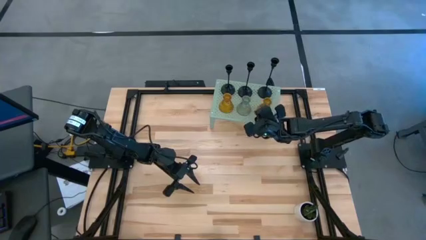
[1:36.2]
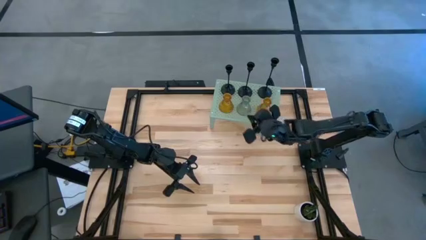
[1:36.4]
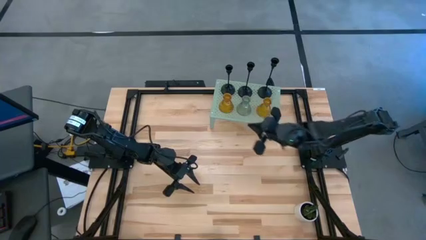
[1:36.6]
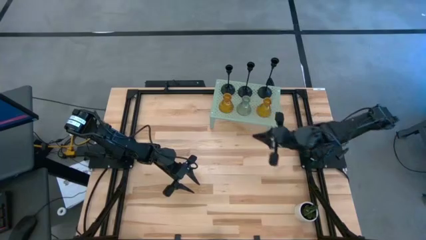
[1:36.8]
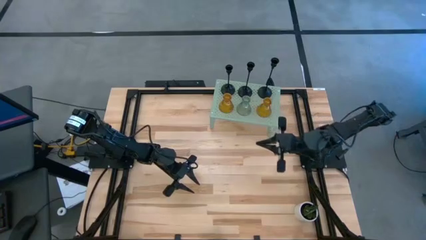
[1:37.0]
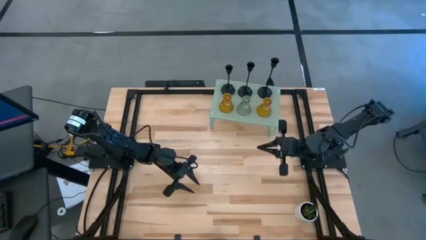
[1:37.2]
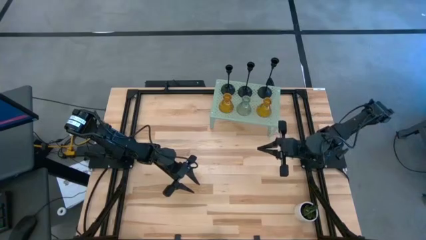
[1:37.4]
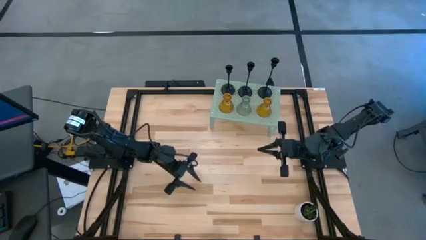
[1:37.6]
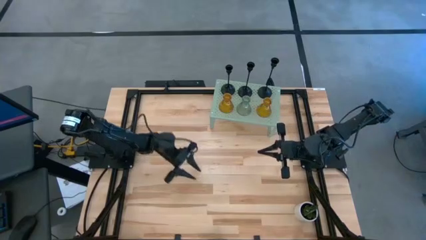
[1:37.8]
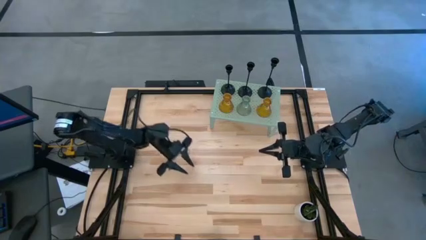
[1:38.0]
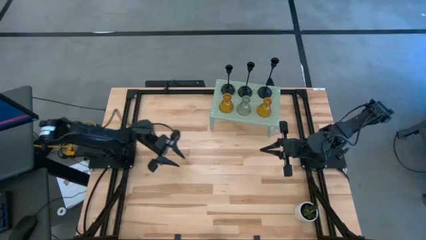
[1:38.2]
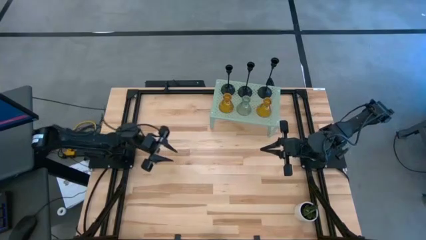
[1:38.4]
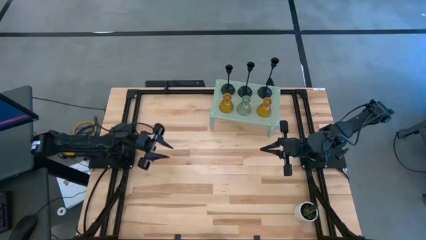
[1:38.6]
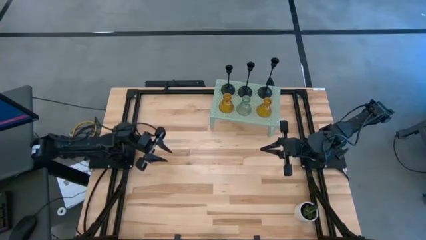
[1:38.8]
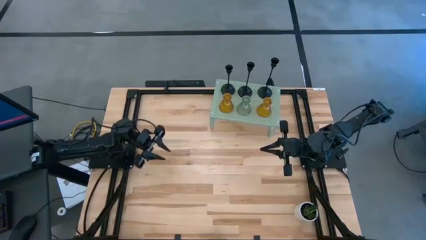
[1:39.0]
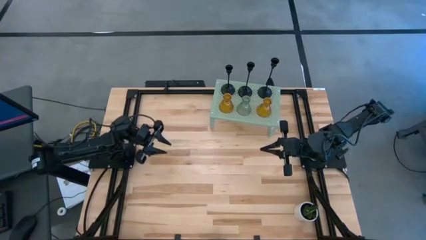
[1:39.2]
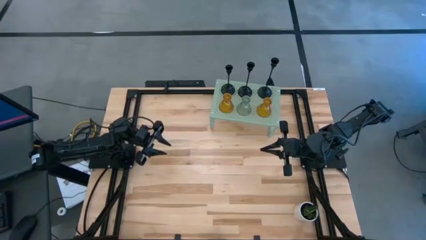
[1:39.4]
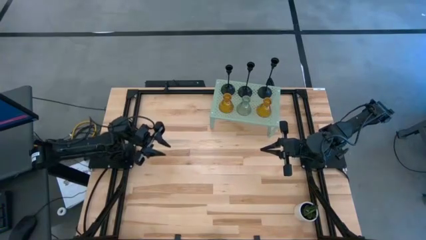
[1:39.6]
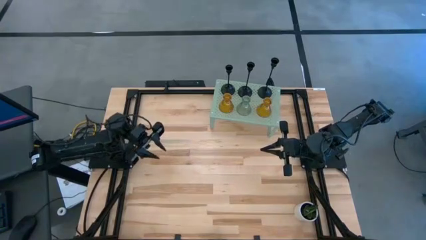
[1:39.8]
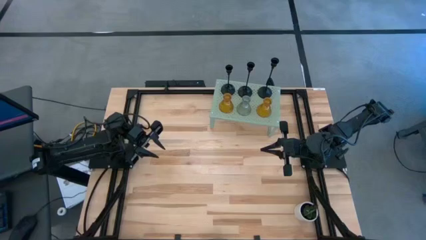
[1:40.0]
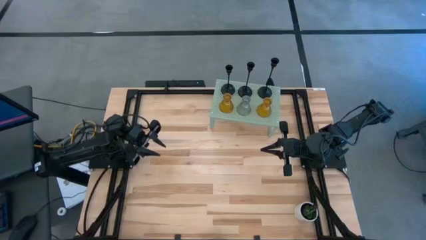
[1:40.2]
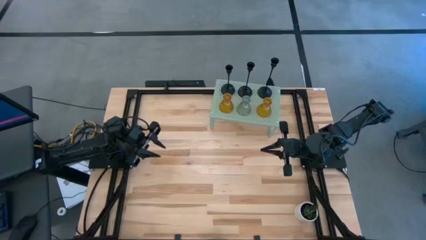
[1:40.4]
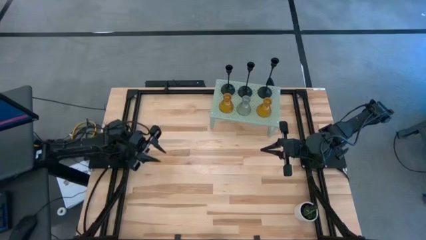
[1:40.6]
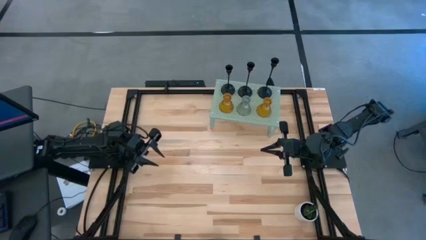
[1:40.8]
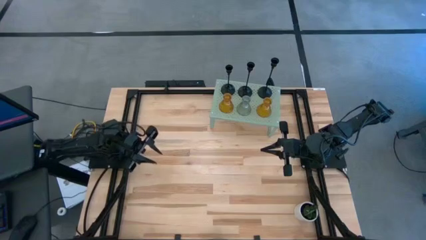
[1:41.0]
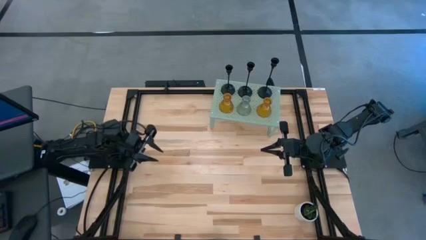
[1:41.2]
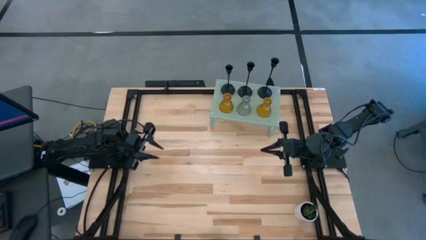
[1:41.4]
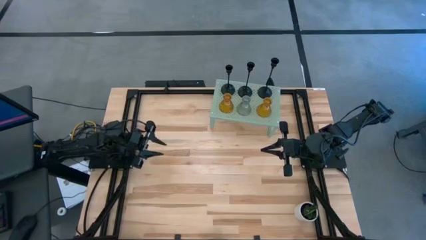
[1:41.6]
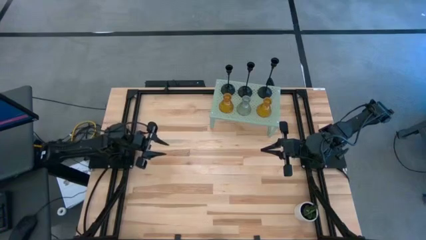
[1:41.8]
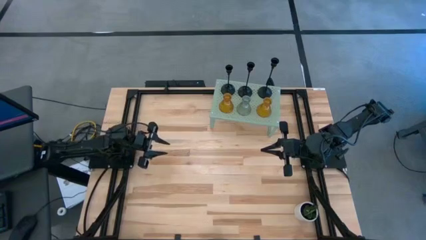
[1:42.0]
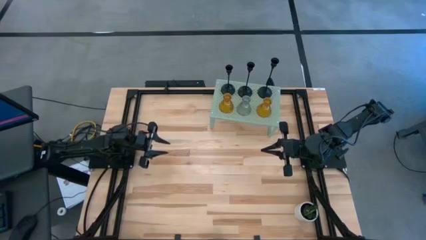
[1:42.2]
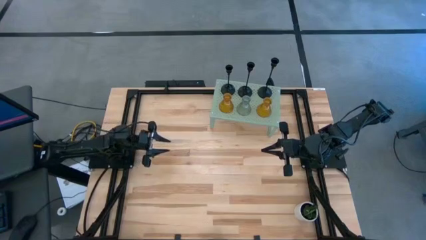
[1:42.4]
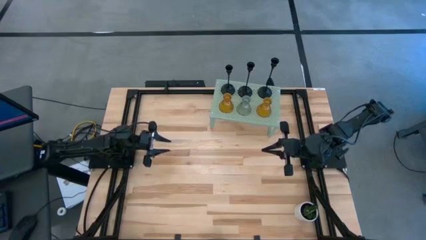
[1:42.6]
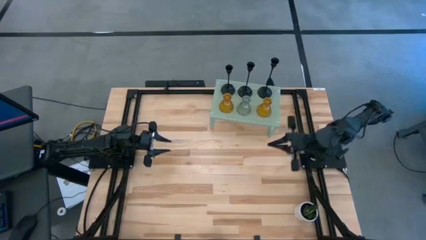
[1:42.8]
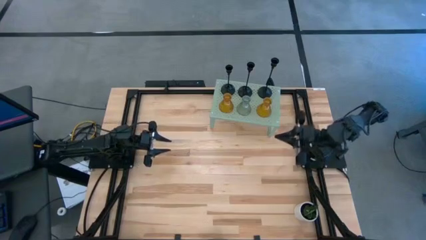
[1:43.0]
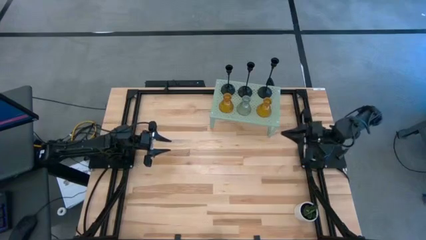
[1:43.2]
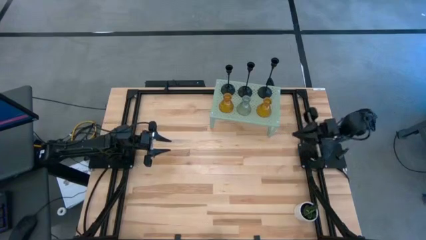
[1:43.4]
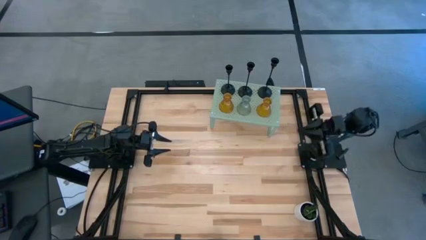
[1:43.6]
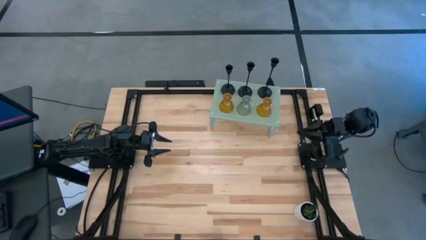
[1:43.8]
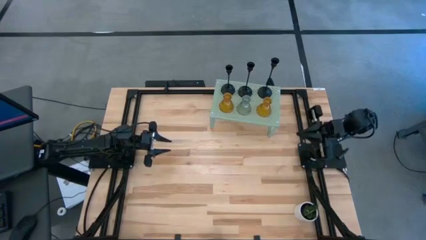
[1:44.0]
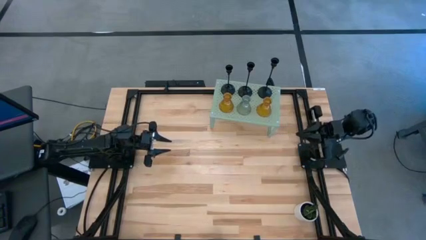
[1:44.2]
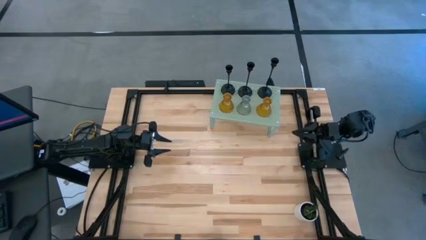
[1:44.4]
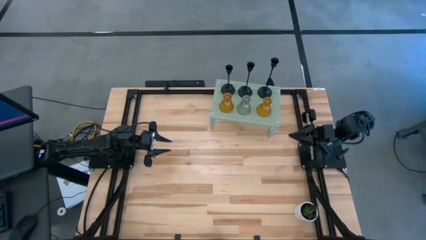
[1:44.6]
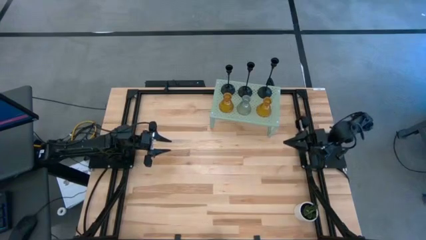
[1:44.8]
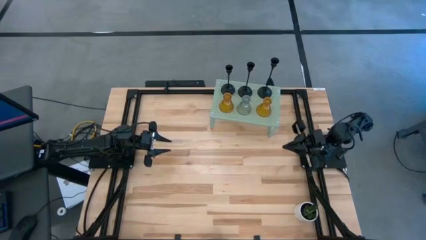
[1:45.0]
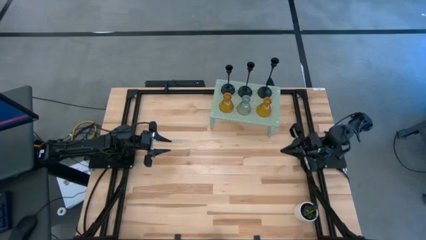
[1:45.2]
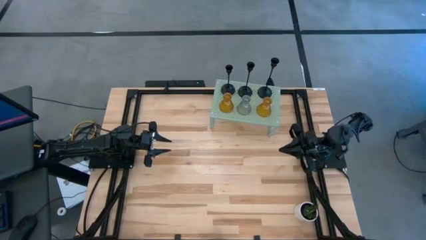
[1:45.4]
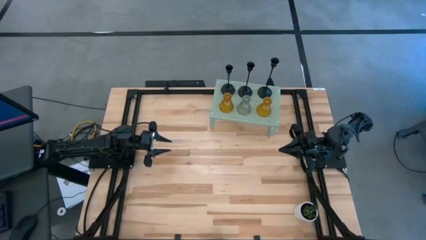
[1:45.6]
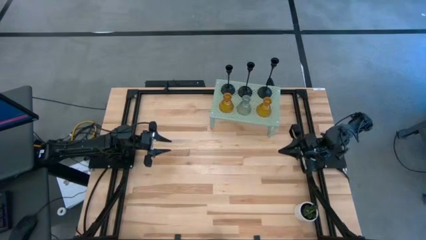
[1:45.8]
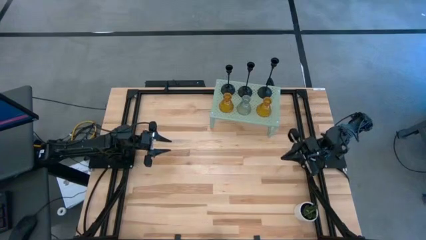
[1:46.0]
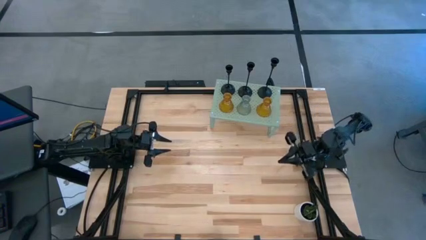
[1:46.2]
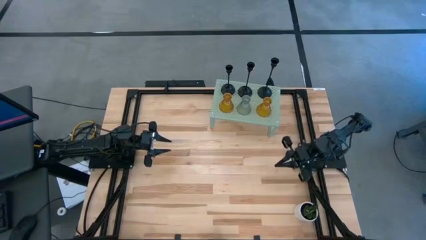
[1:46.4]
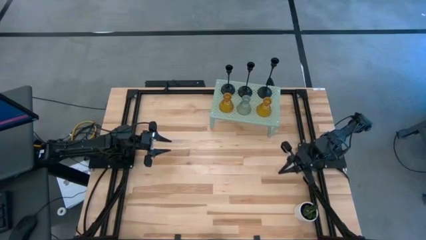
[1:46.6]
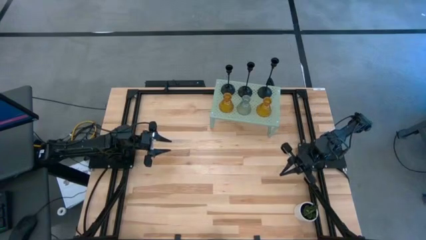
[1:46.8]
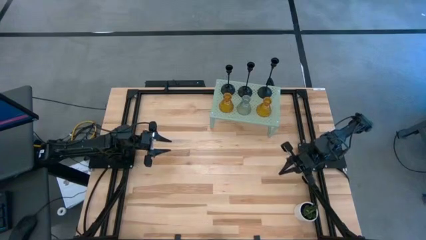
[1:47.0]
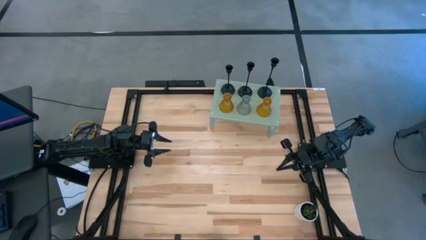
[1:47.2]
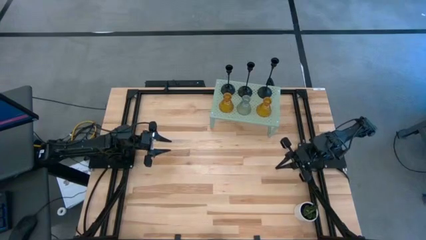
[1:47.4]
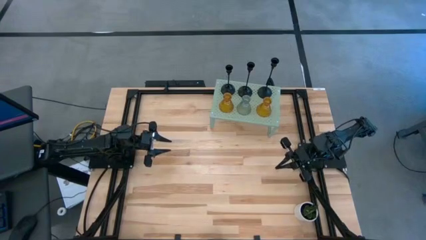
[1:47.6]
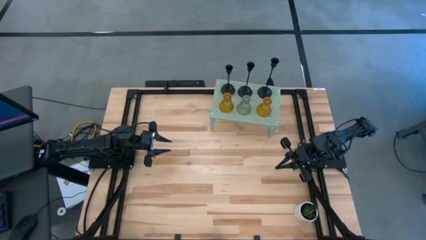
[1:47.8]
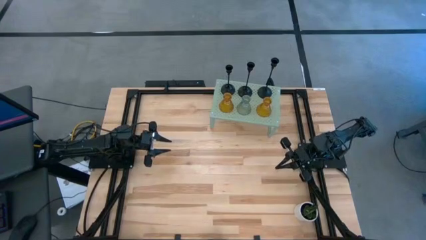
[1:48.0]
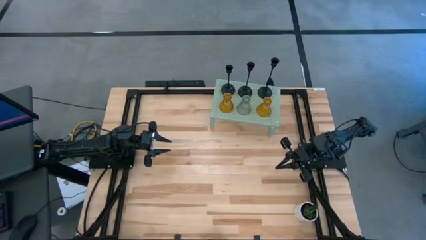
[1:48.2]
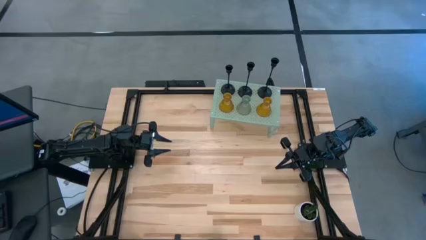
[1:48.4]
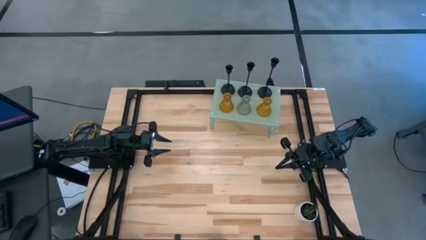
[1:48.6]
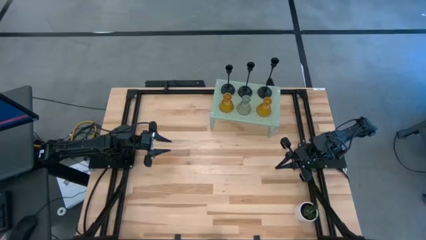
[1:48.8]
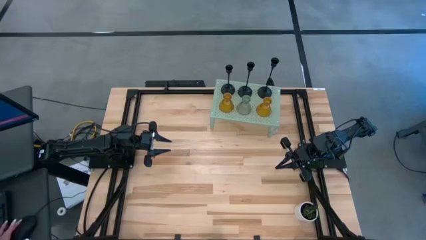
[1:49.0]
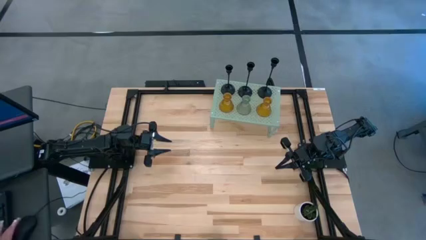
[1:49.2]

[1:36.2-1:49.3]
Task: Pick & Place candle stick holders
Return to Home Position

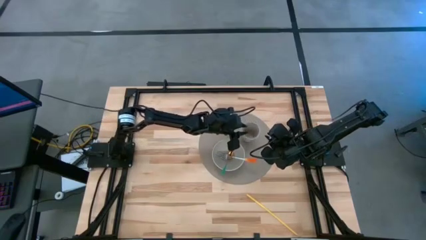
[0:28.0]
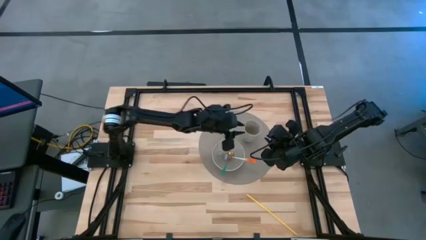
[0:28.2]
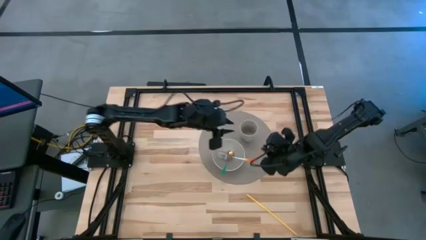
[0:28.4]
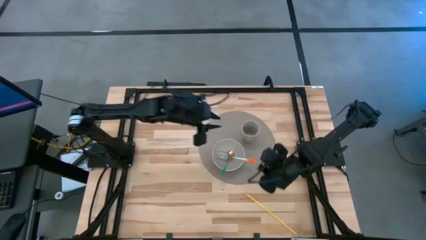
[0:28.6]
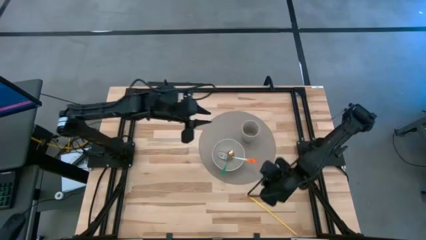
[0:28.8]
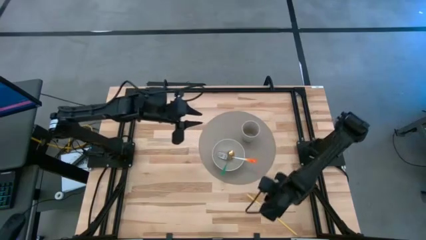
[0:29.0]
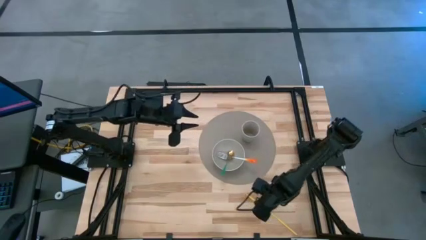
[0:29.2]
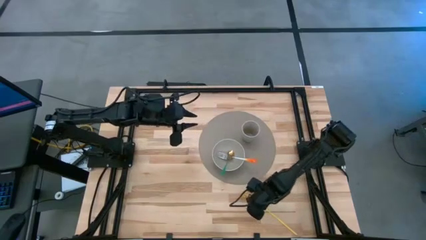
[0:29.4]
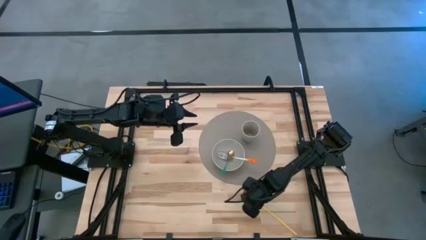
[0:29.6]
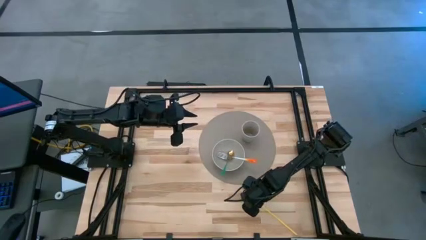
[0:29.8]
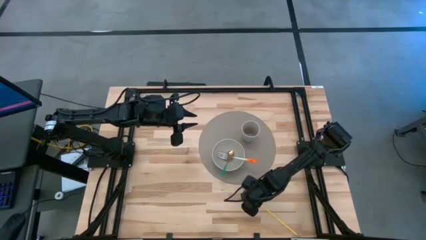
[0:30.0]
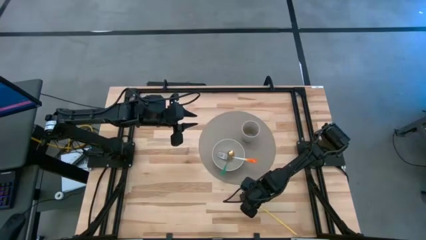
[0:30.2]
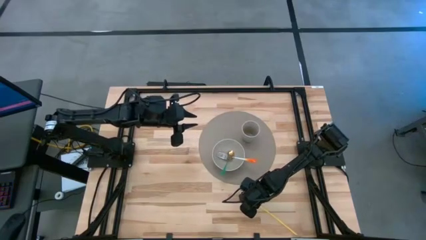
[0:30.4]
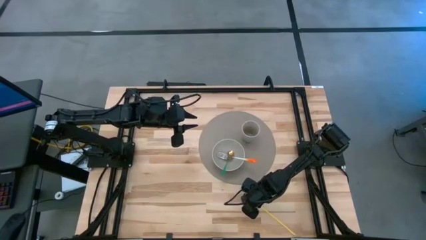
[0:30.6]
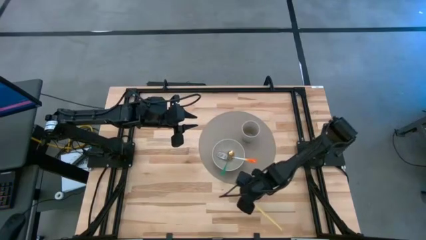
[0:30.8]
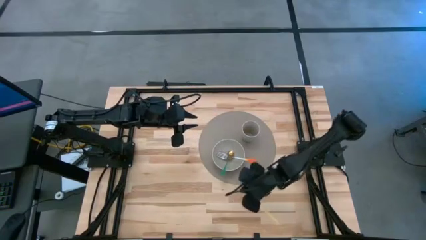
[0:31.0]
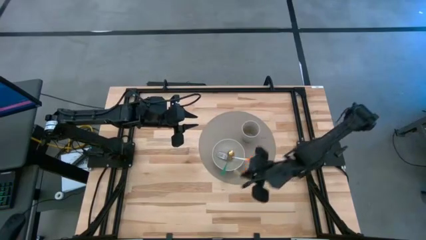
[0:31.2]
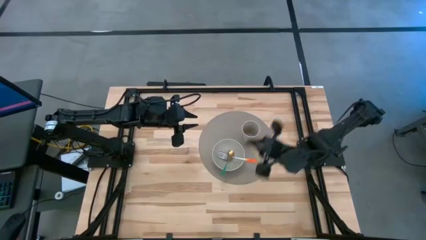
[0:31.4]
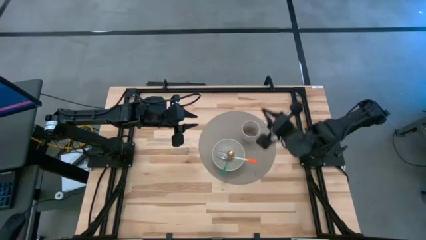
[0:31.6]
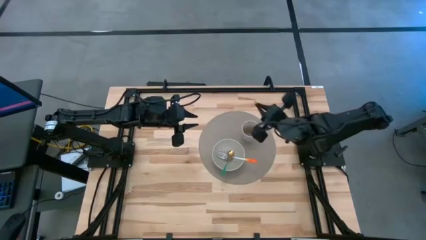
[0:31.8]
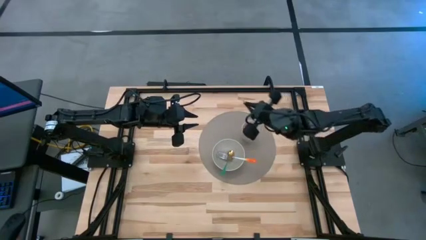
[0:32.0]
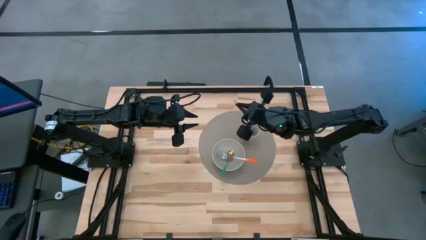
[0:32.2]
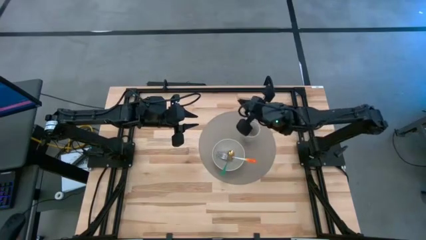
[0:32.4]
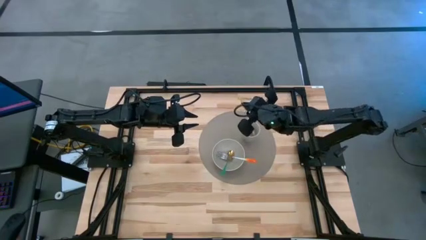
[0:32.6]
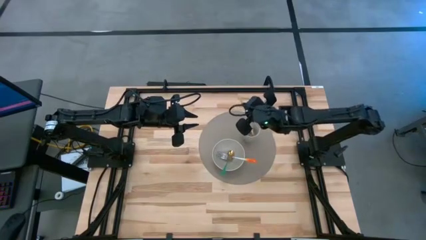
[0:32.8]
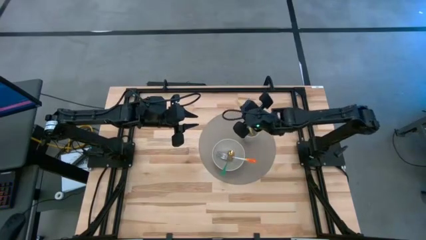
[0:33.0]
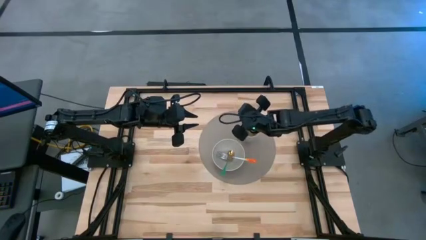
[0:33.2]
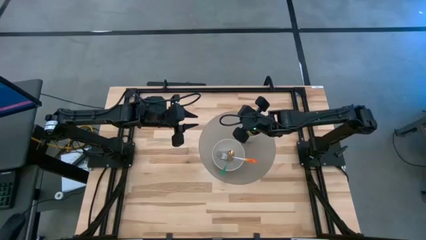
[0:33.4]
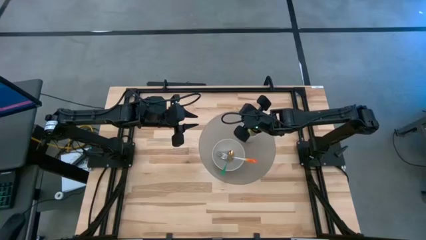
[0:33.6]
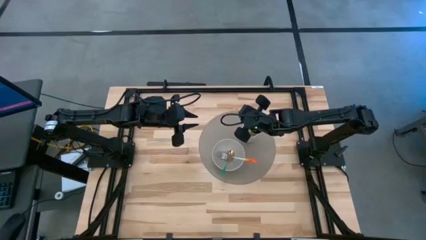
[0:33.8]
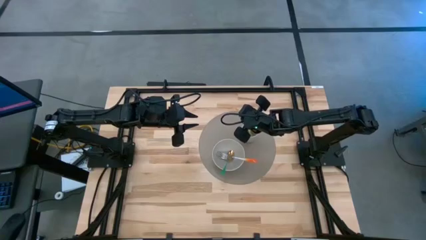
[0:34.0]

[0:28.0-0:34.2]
Task: Pick & Place Utensil
Put the yellow sipping straw into the cup
